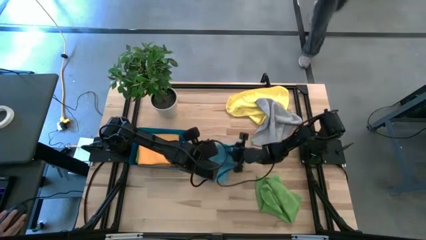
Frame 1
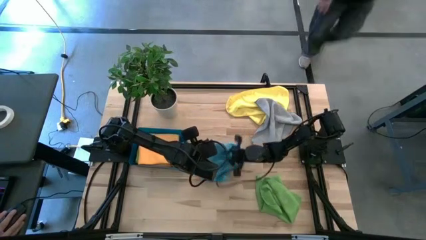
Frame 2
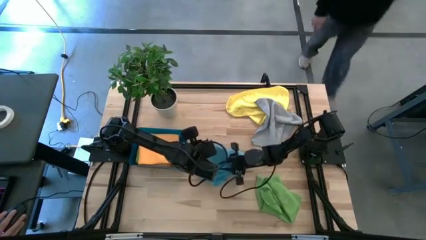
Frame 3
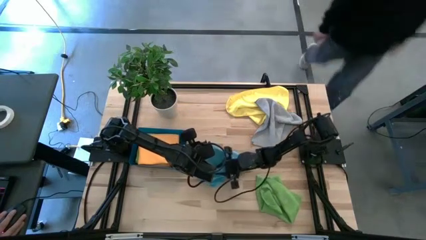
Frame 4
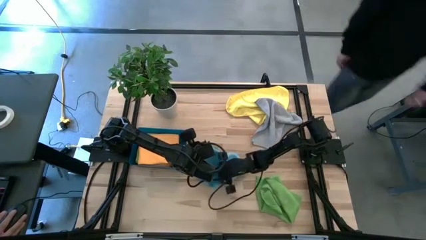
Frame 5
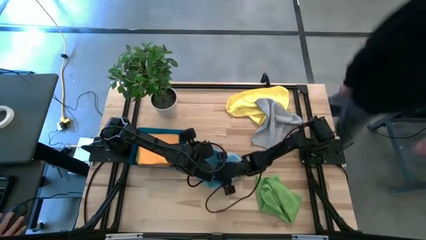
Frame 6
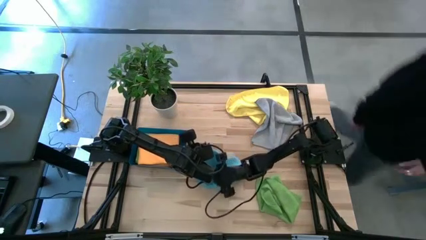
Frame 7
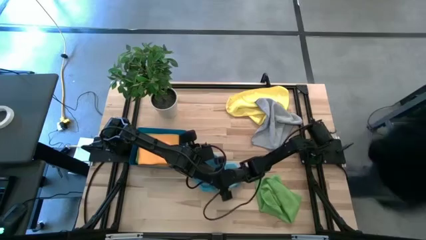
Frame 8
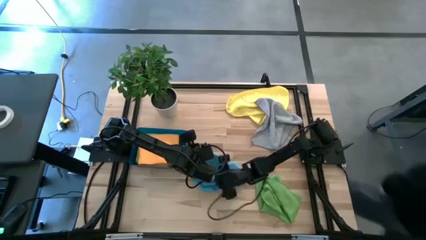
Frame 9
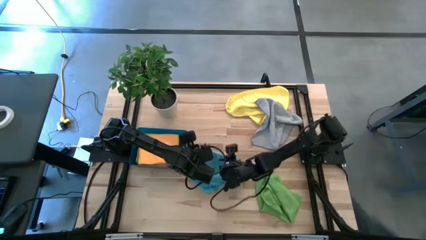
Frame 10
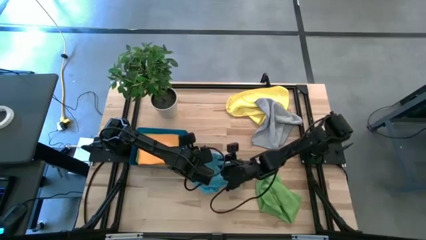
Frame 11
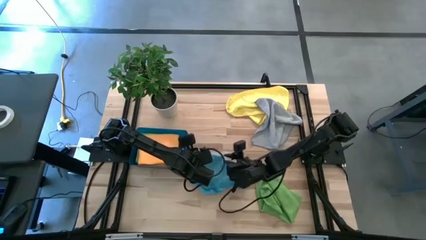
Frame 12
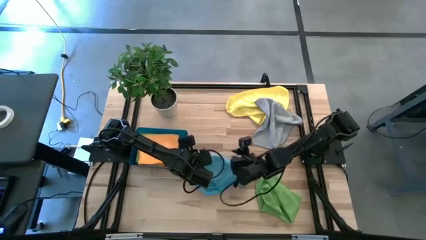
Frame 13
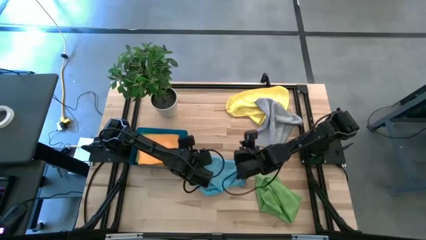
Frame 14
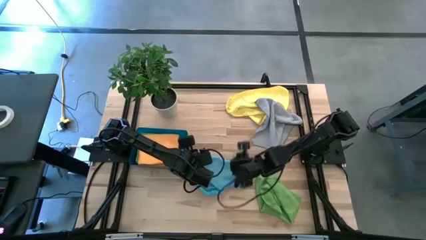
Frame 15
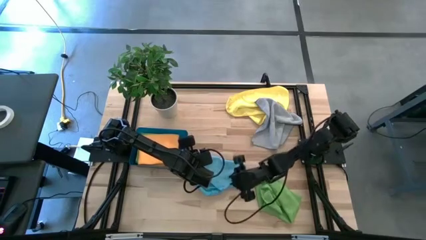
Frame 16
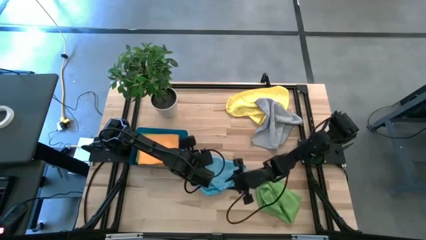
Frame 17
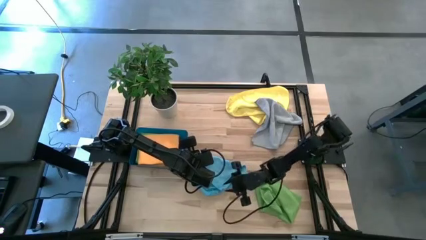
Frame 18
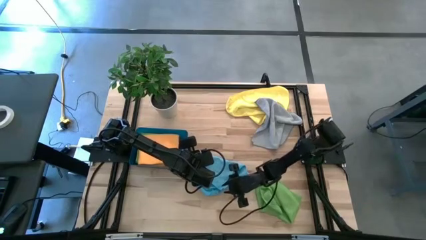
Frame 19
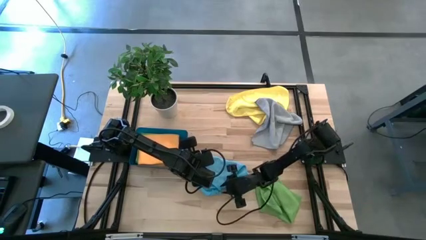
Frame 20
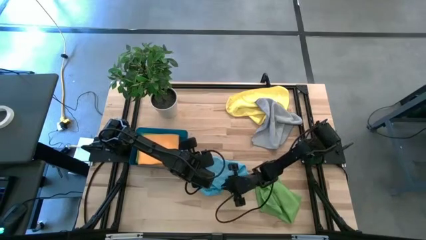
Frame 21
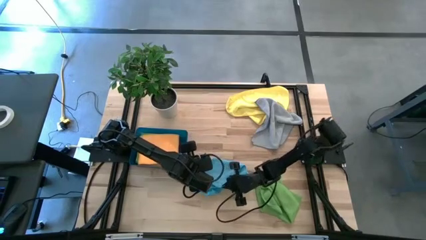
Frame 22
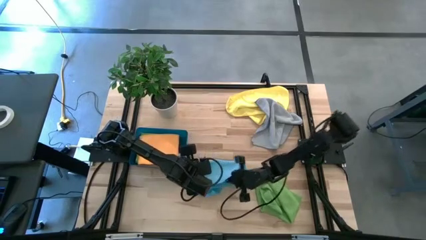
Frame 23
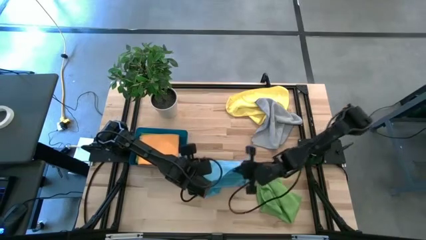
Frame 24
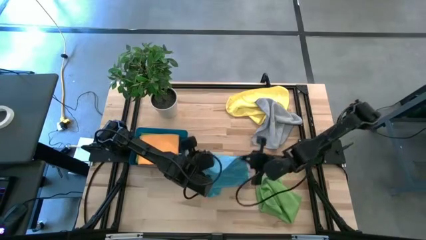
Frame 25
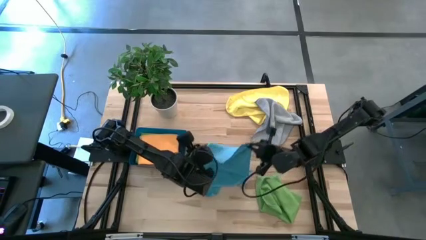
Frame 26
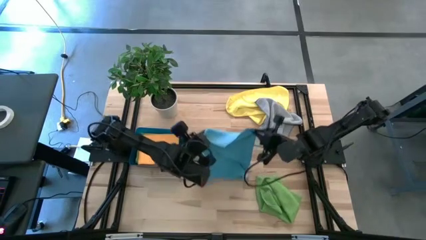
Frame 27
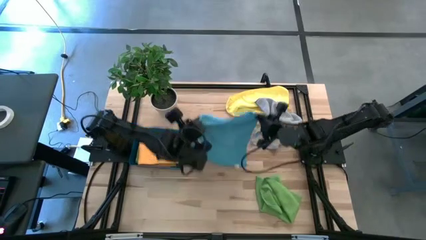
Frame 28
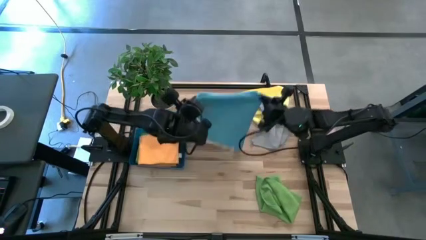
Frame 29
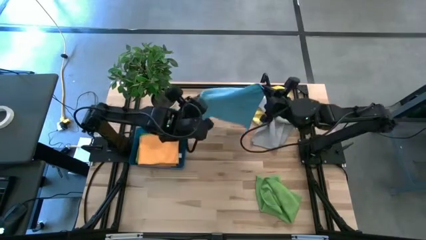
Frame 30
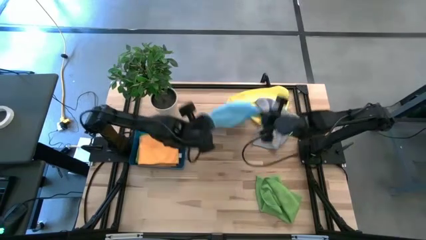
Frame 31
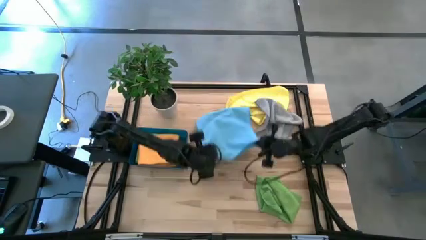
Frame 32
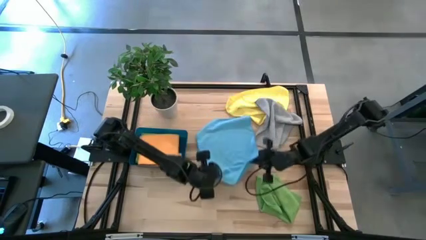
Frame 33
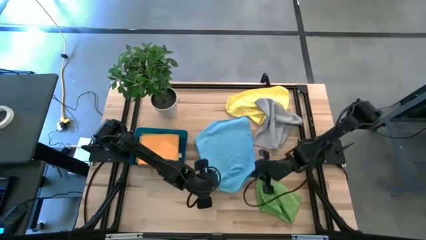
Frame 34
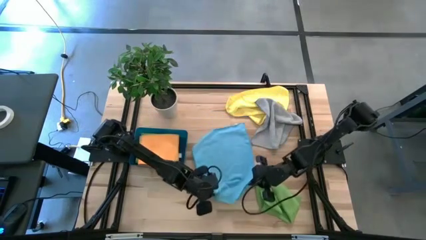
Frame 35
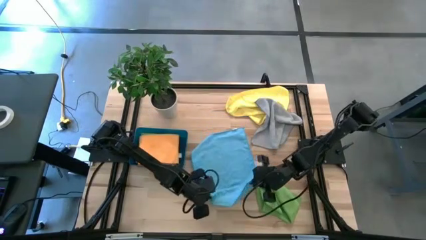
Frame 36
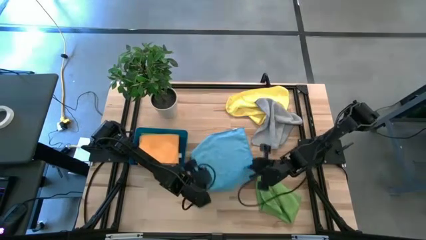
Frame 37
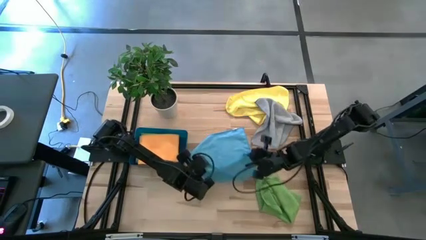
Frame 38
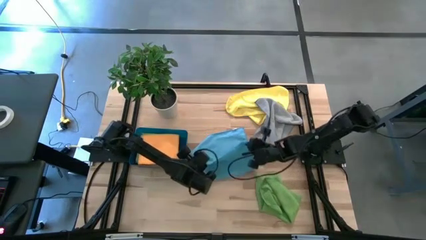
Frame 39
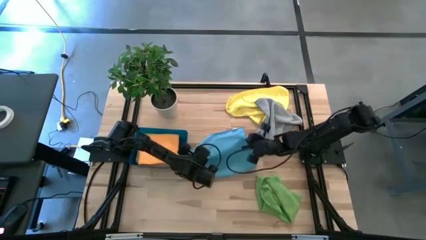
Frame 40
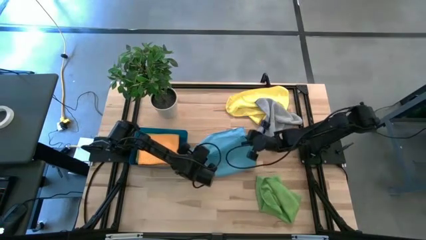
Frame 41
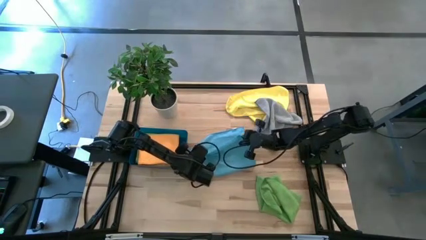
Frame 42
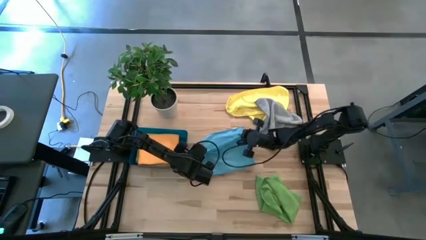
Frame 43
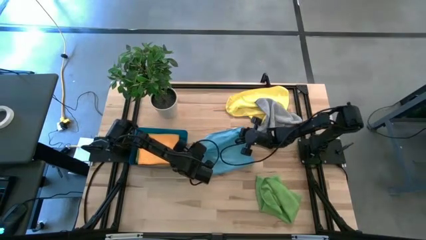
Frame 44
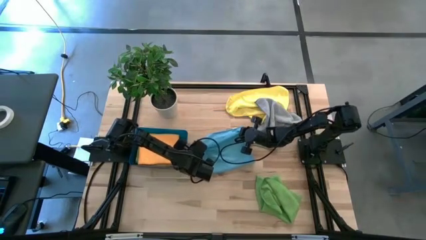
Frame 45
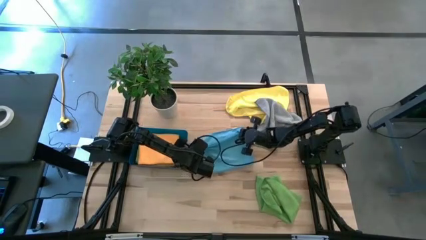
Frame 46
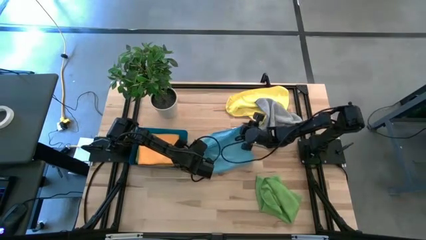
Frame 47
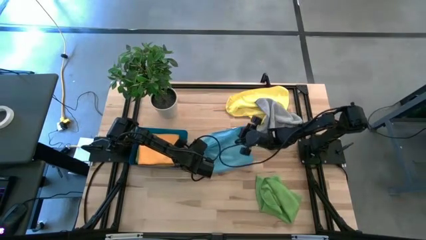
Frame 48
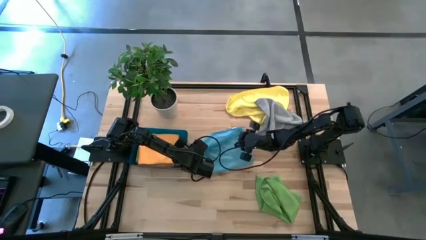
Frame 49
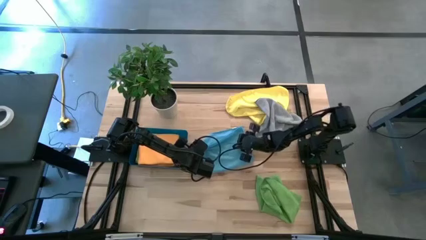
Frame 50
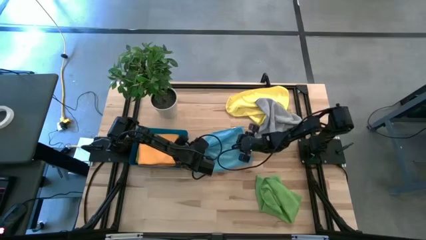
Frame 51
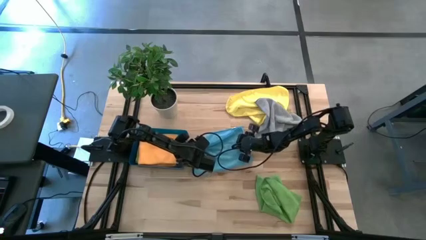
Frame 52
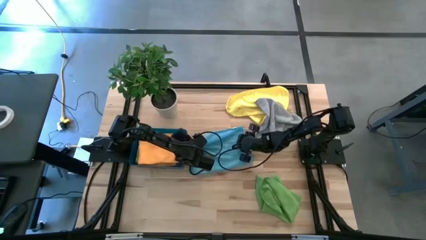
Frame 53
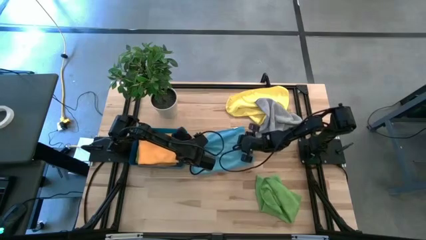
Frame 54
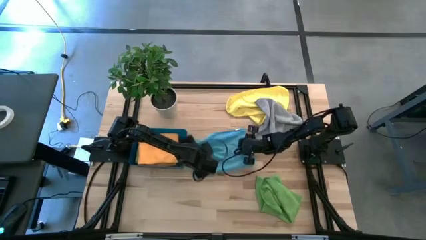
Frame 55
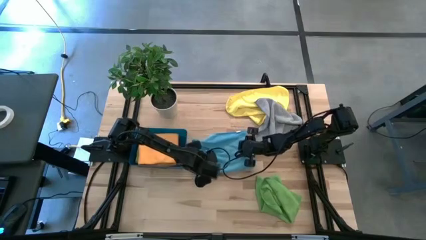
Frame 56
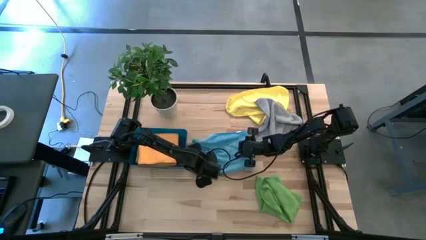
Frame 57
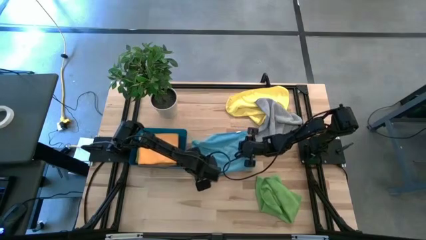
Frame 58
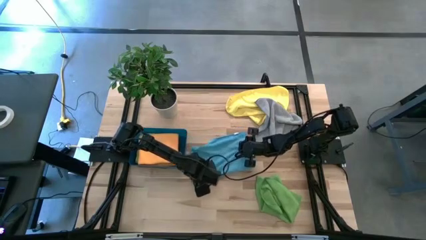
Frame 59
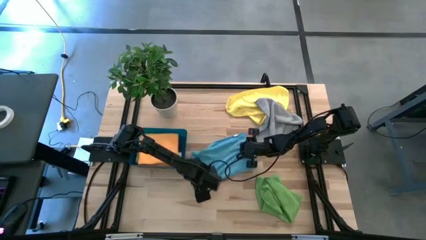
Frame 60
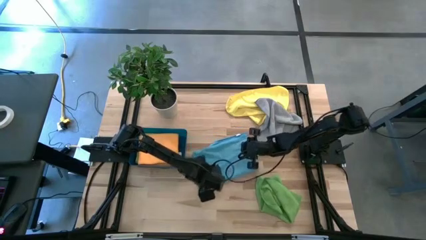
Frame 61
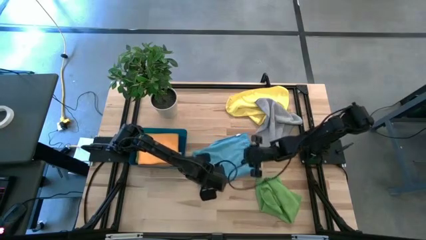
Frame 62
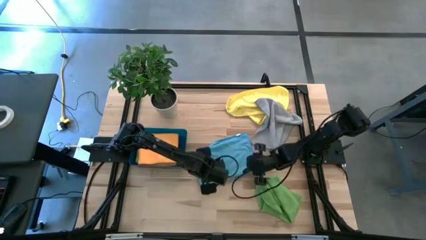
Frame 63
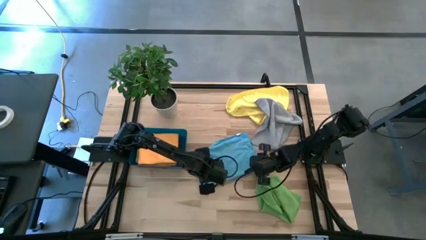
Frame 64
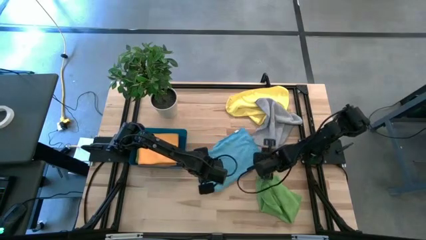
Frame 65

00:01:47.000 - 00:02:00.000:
Task: Fold microfiber towels
Fold the blue microfiber towel on the table
